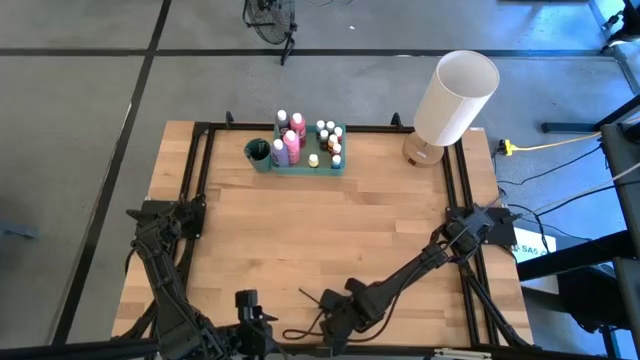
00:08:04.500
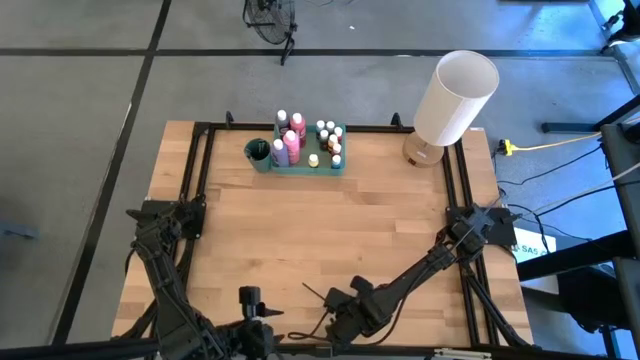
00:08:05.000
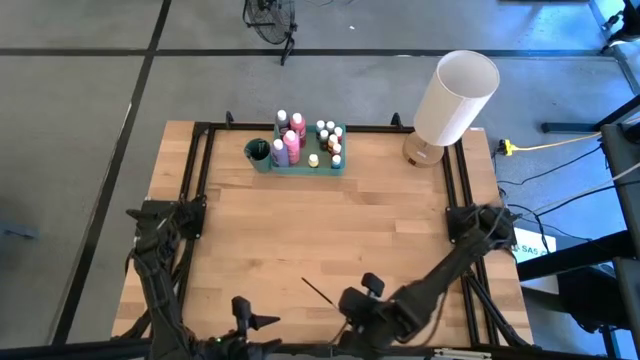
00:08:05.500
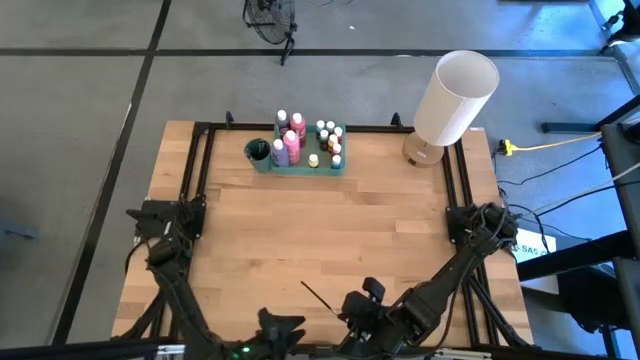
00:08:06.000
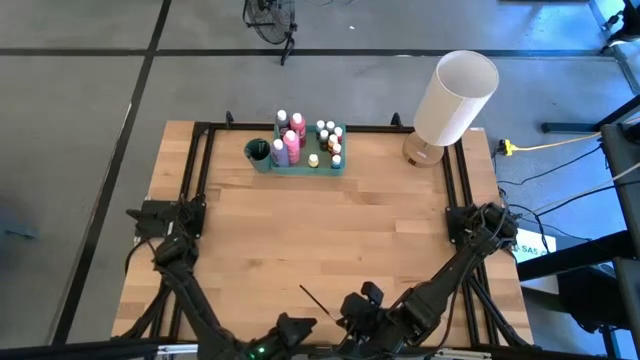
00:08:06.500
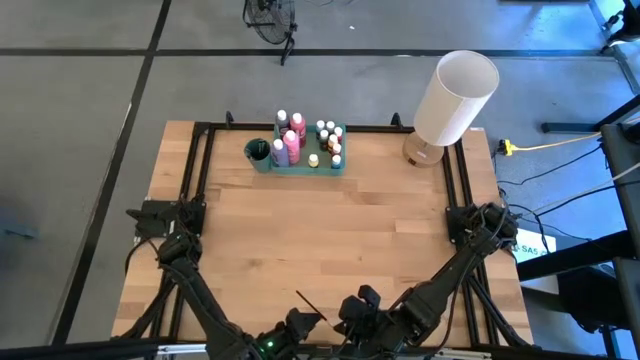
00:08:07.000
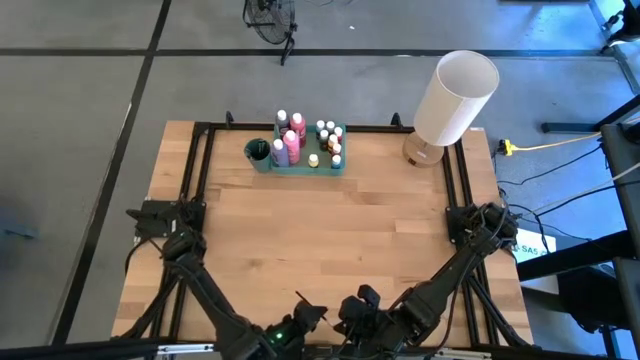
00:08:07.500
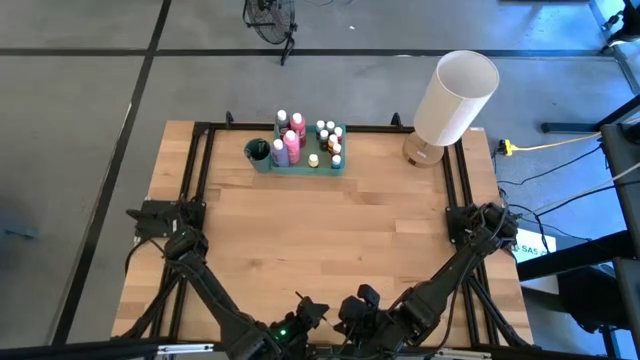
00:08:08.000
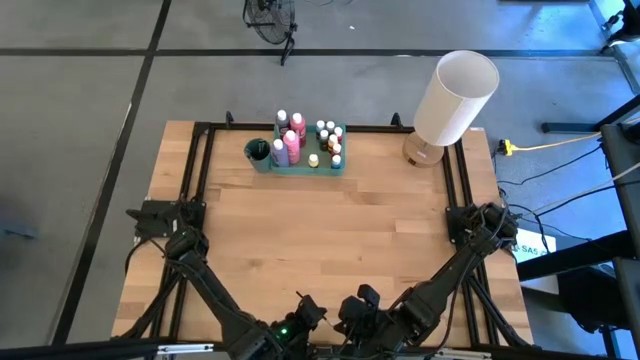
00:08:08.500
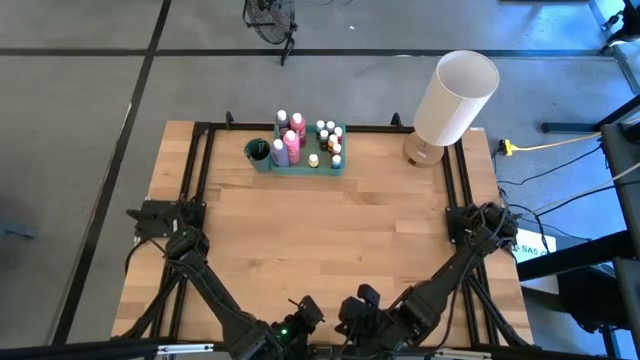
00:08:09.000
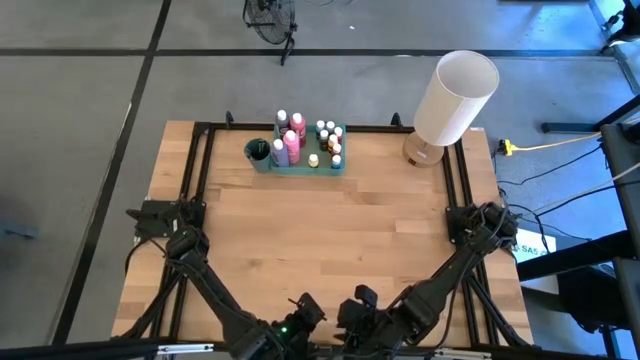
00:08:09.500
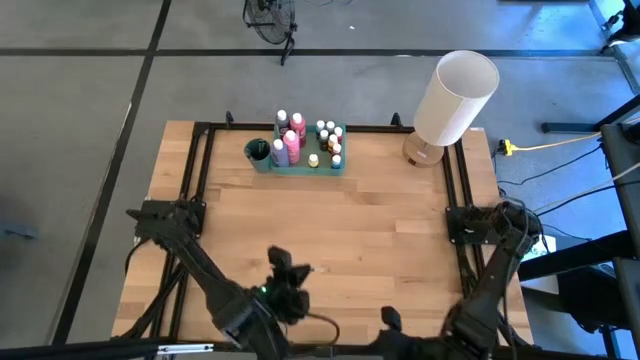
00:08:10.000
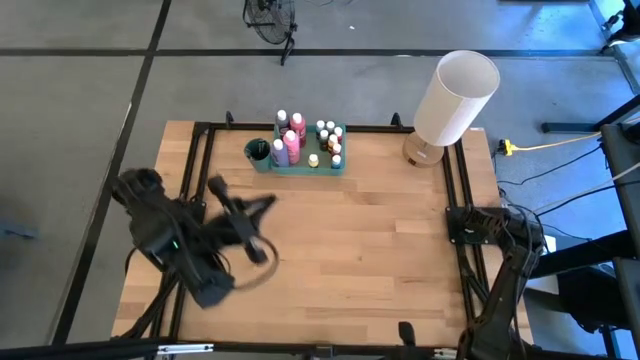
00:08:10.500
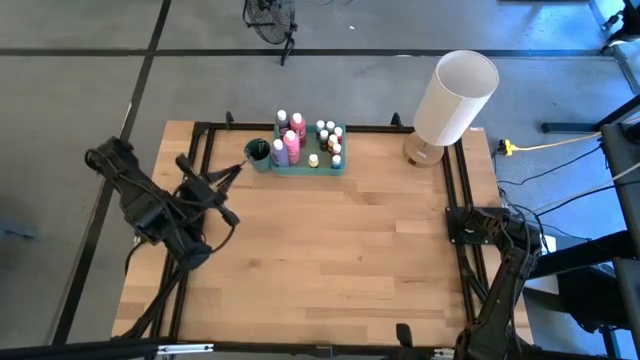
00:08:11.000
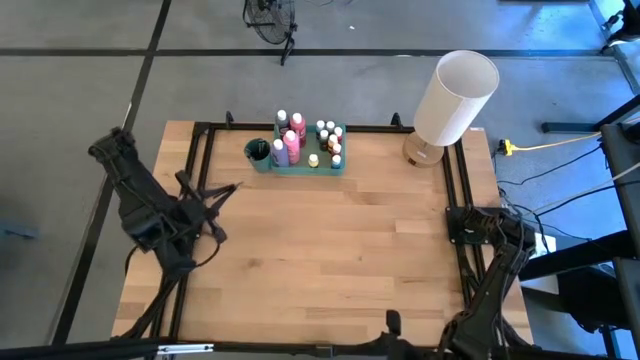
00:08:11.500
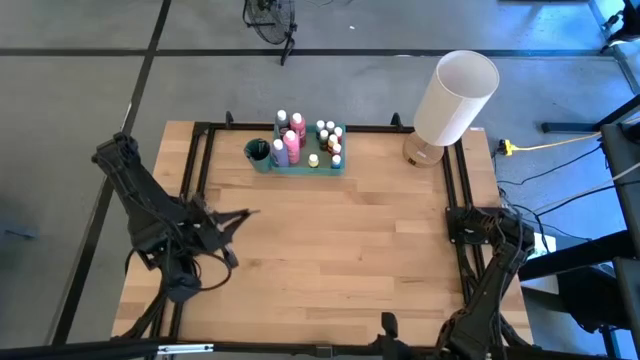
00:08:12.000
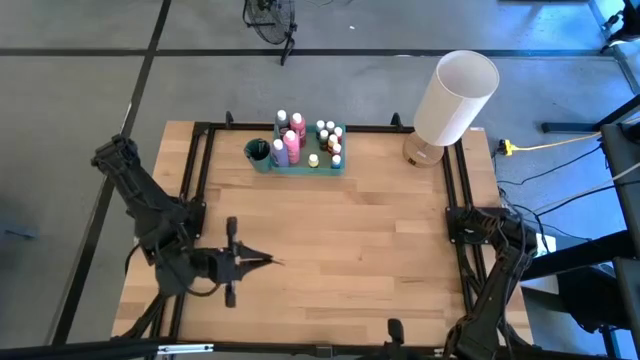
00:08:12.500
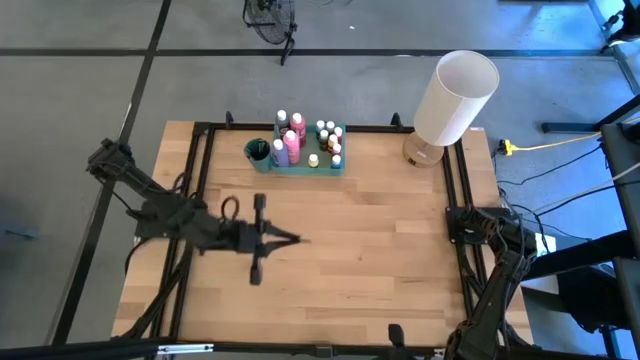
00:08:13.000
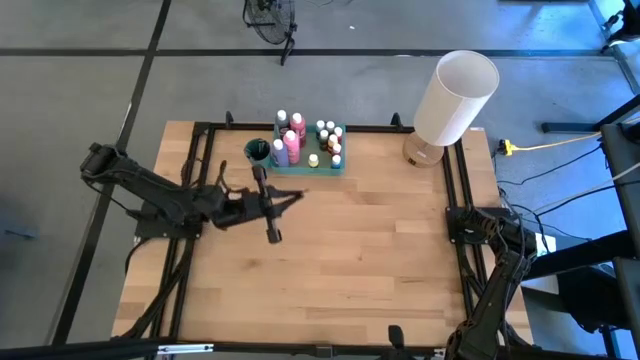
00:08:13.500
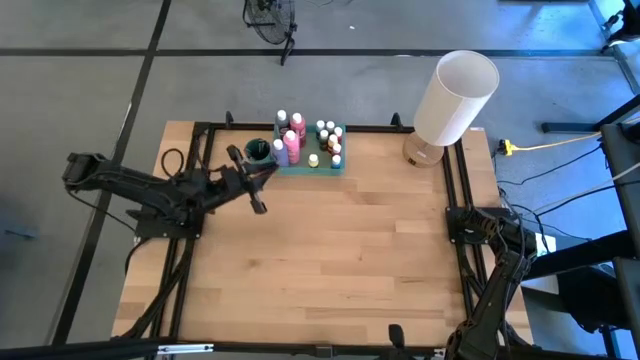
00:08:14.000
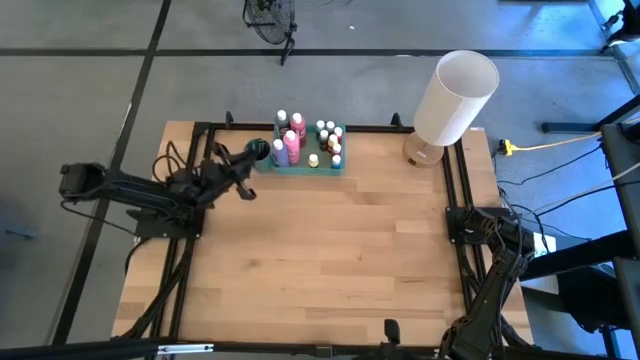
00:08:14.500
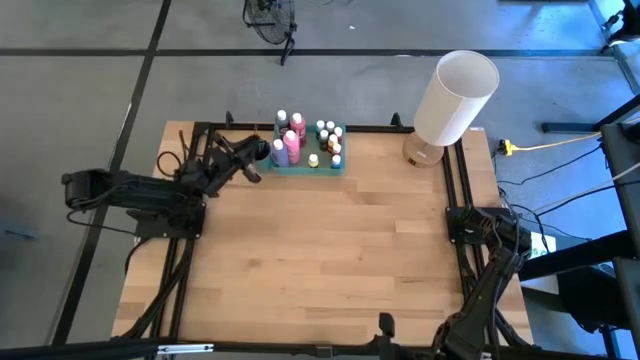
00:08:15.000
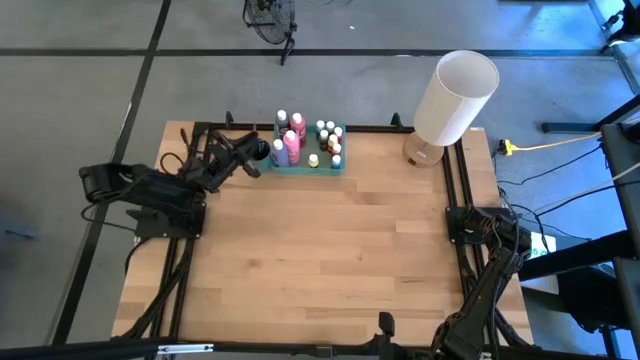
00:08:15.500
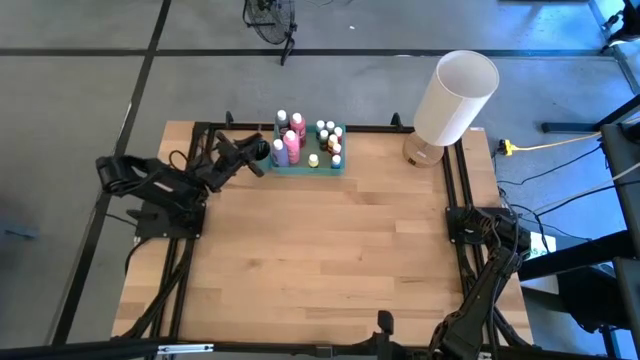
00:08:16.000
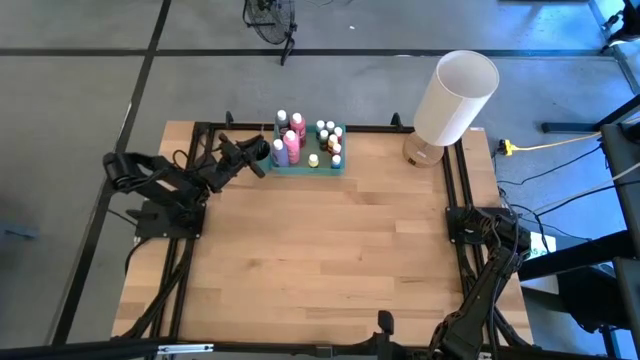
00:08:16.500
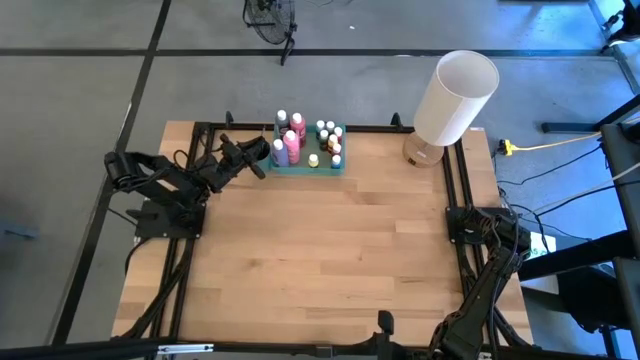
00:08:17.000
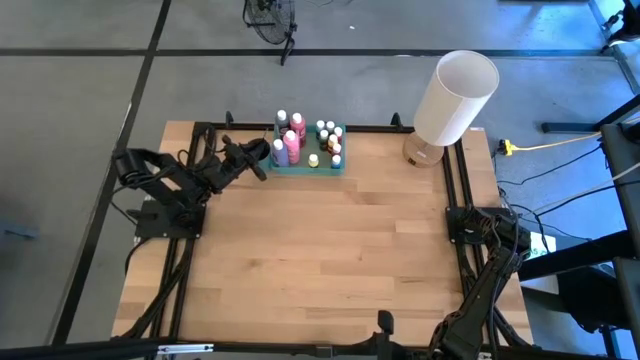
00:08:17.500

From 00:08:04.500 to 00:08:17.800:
Task: Pick & Place Paint Supplies
Put the silver paintbrush into the green cup

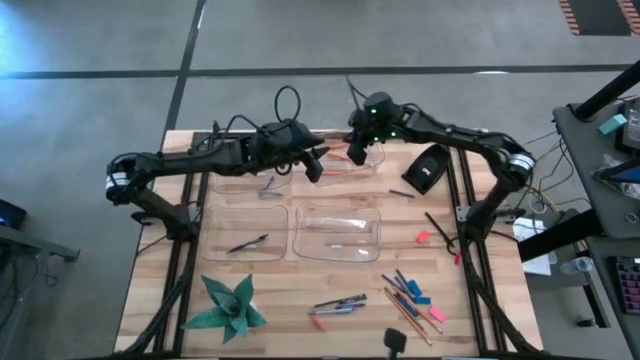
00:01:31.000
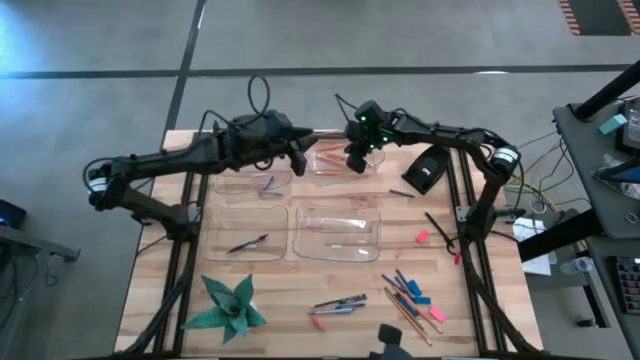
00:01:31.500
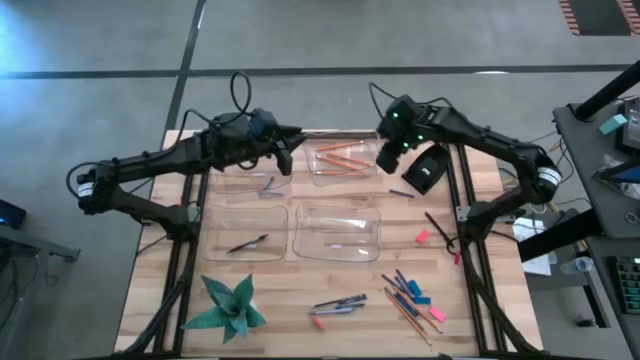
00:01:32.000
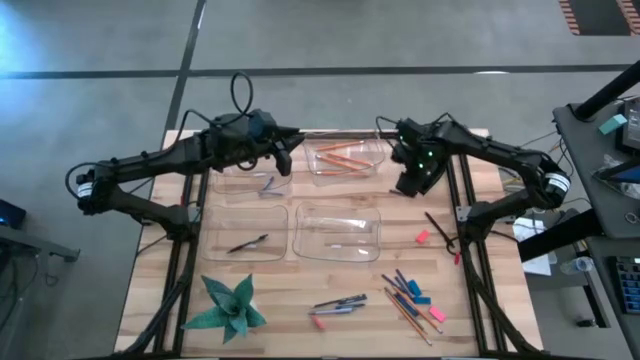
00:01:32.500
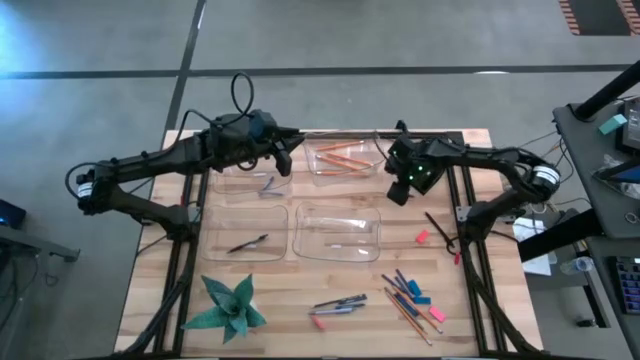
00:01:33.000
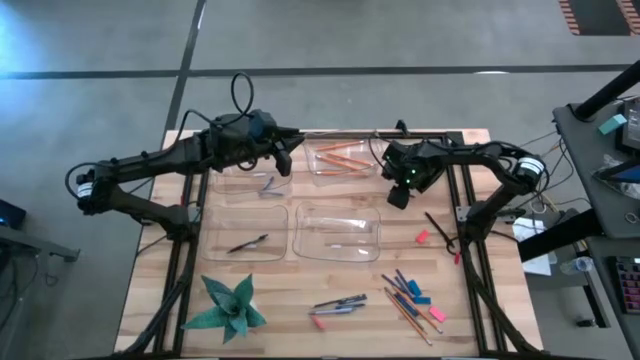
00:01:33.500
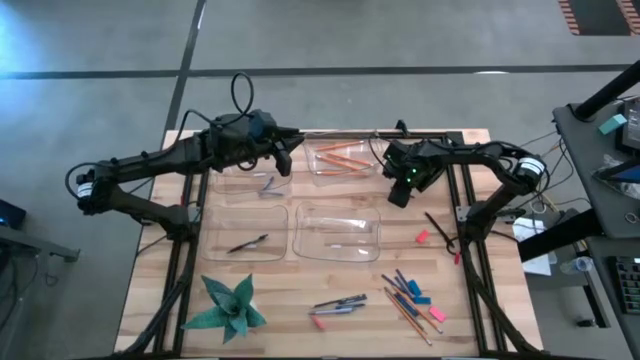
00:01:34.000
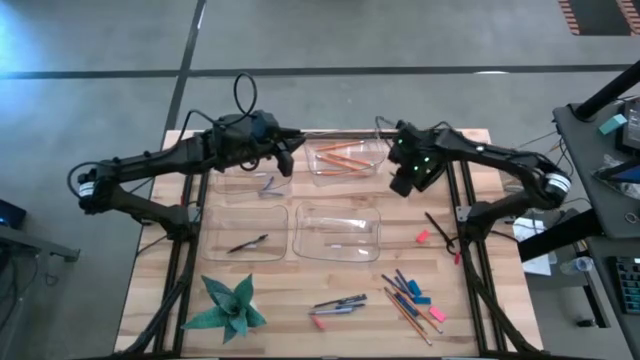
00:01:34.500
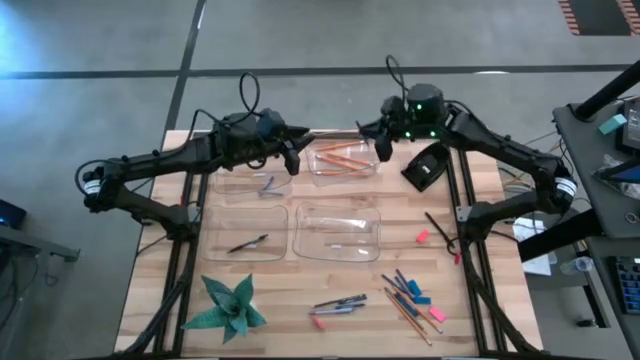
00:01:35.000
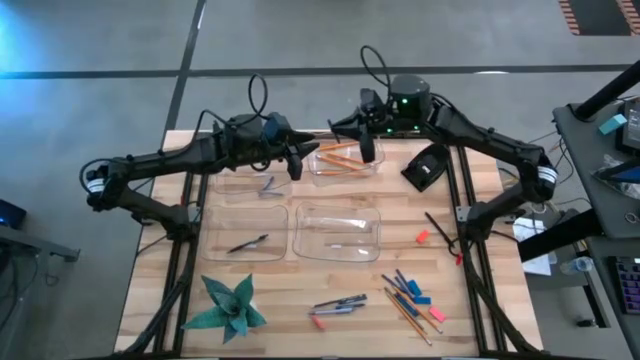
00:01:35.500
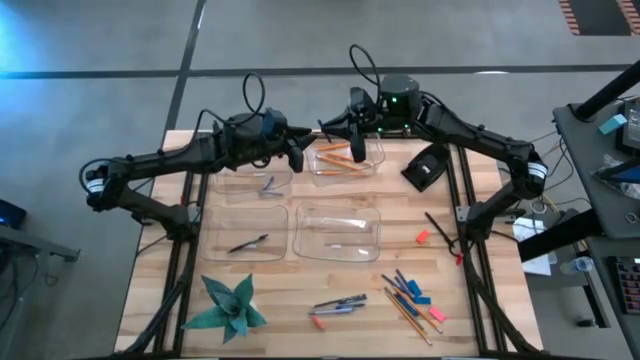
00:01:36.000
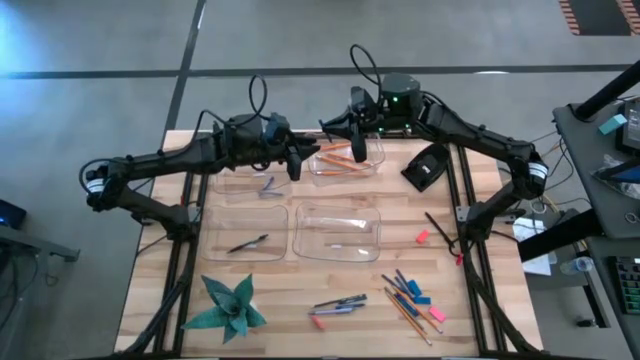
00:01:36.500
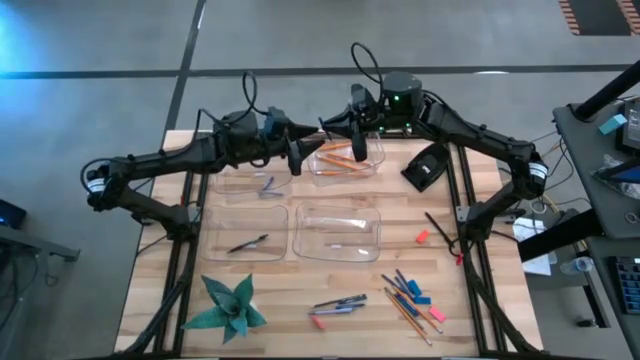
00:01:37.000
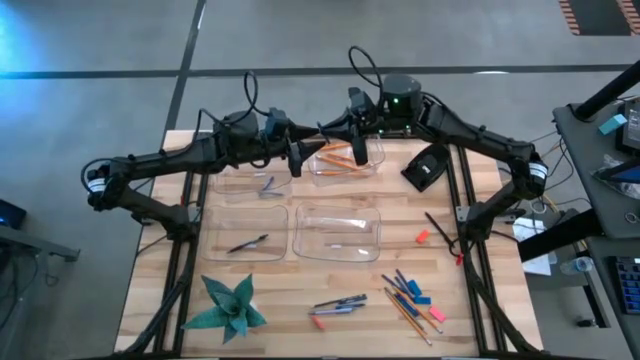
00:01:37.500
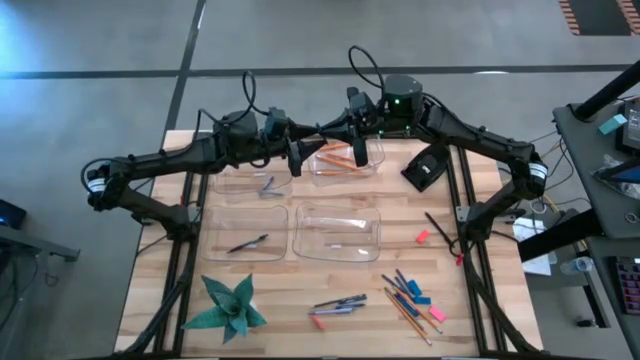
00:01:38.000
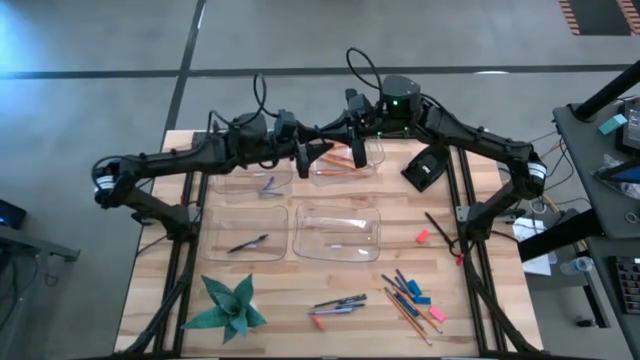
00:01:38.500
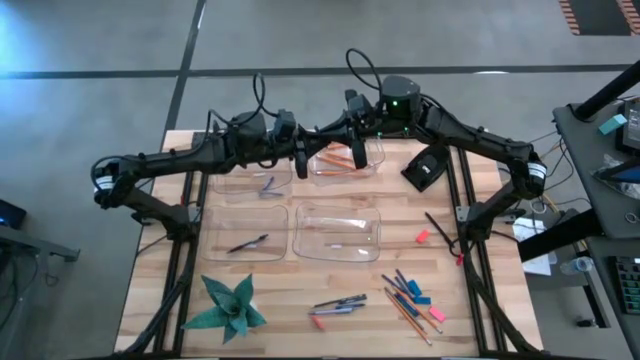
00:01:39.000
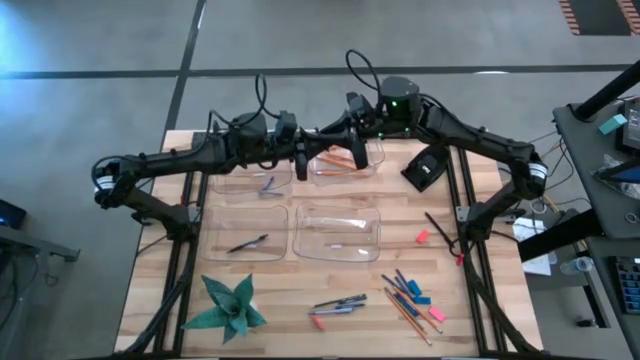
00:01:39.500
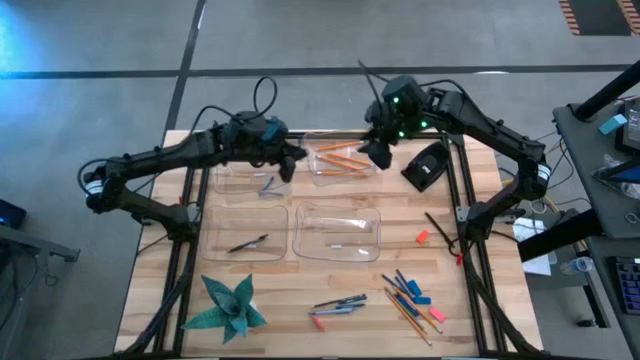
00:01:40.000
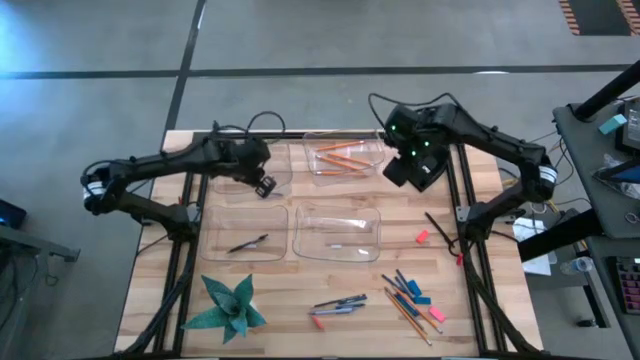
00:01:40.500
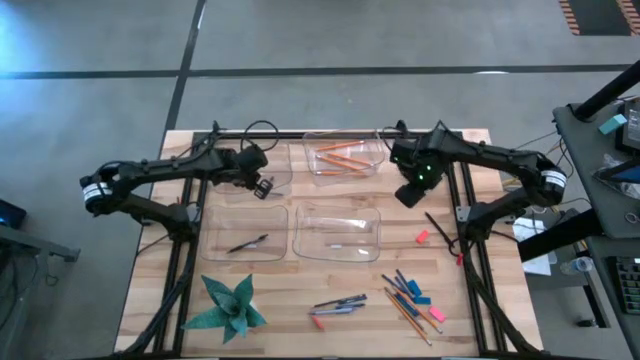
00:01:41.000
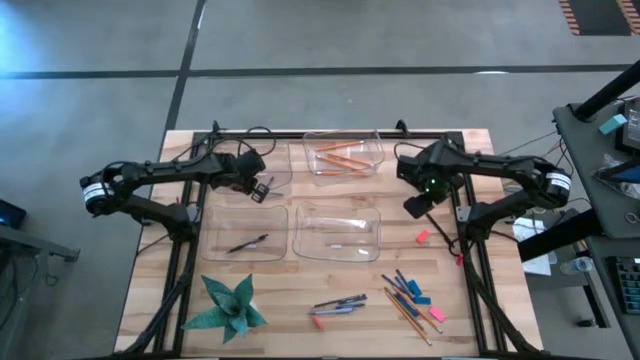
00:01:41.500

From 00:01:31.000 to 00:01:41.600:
Task: Sort crayons/erasers/pens/pencils in bins
Put the blue crayon into the top left transparent bin
